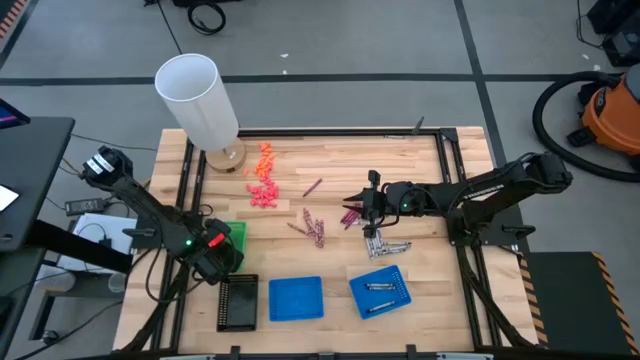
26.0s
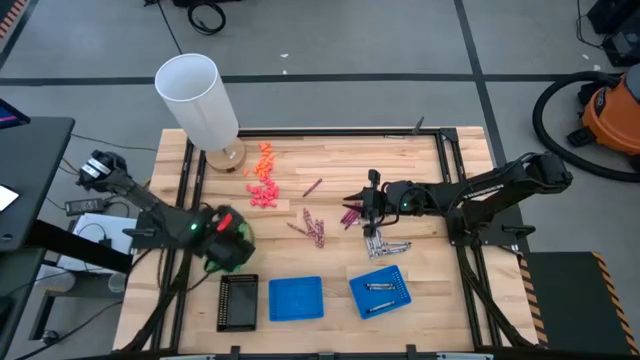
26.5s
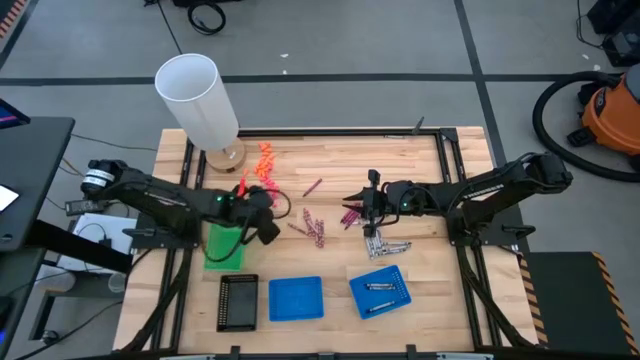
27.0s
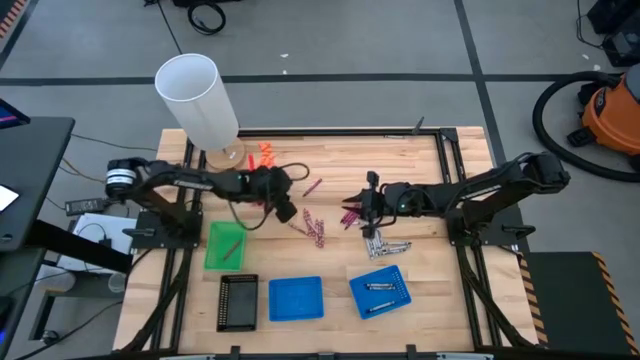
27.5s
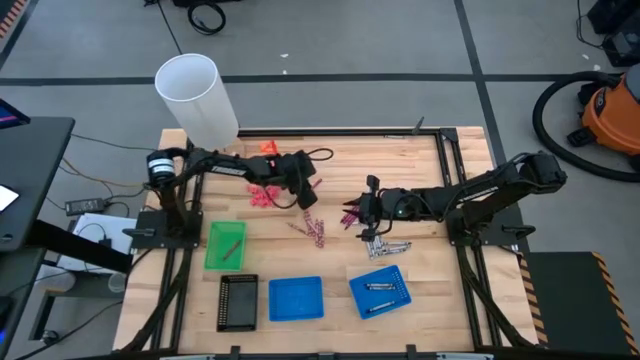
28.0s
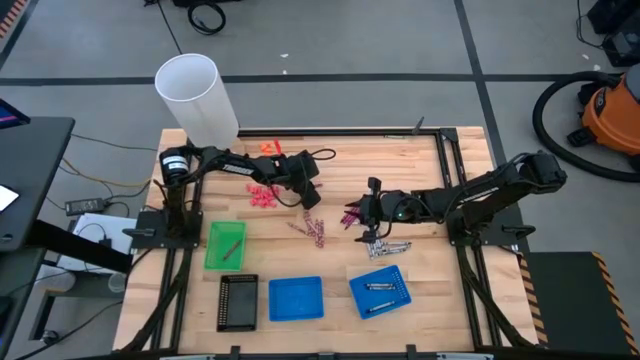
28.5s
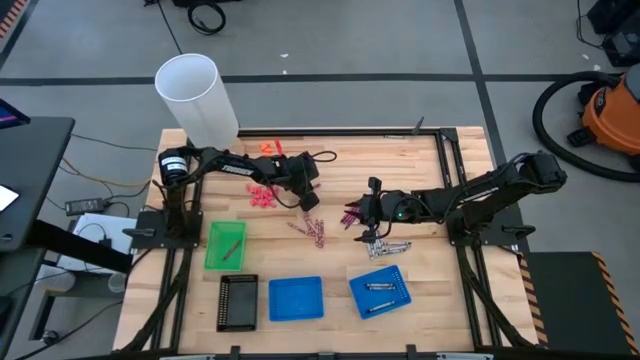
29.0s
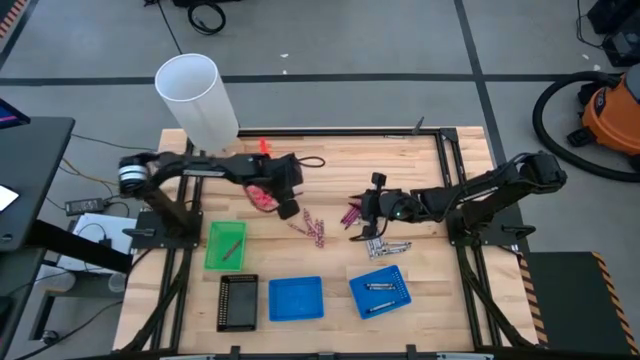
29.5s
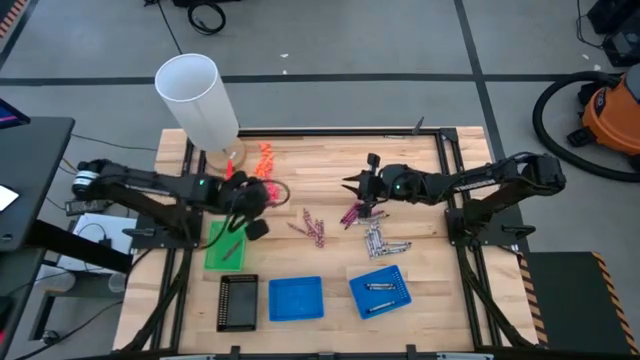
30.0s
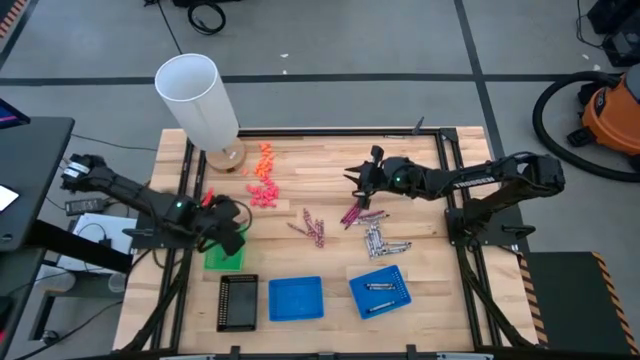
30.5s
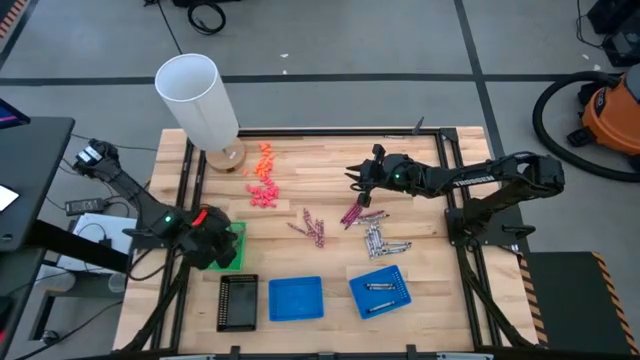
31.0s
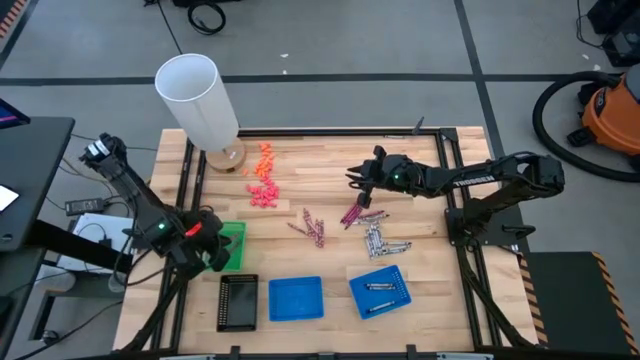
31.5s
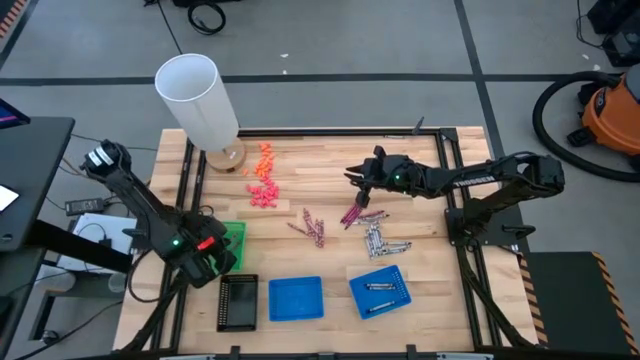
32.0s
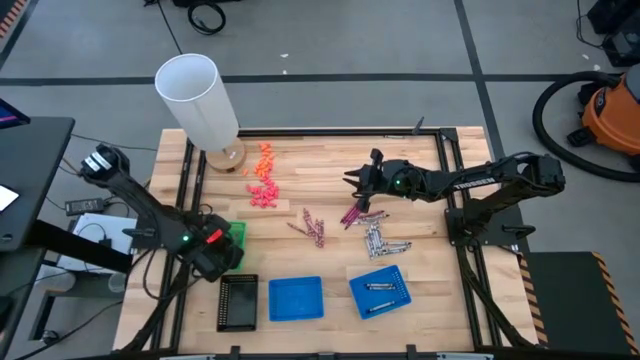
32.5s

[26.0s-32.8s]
Task: Sort crayons
Put the red crayon into the green basket

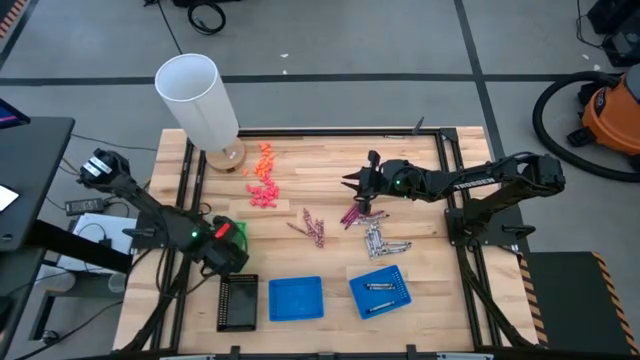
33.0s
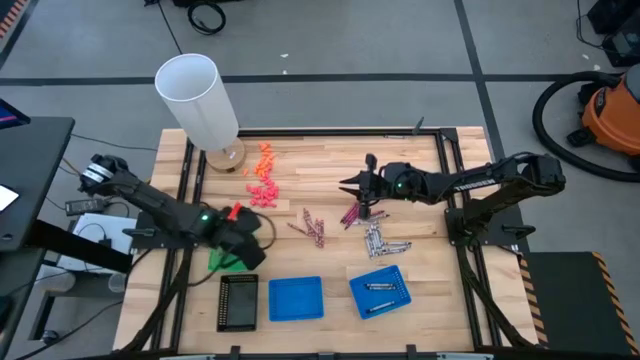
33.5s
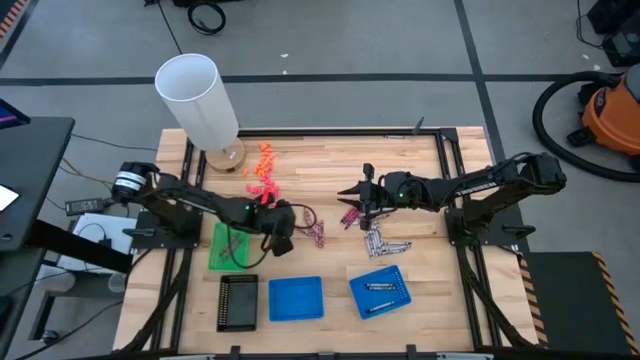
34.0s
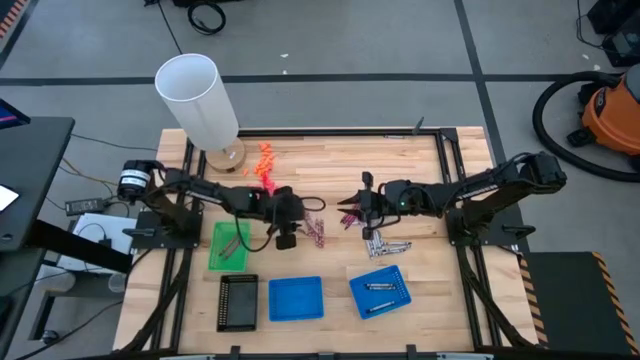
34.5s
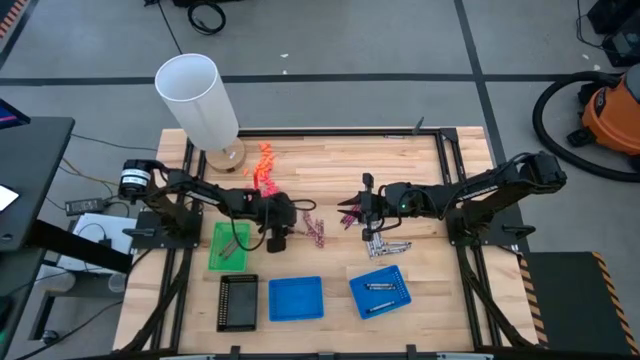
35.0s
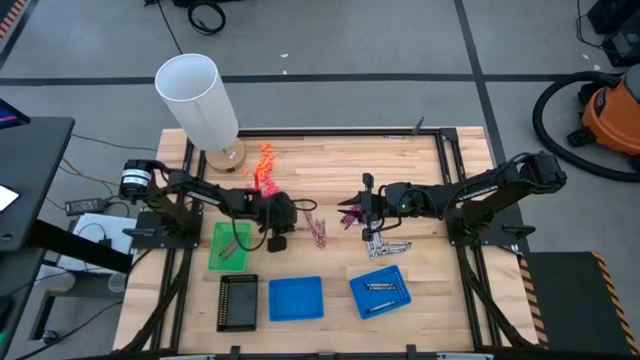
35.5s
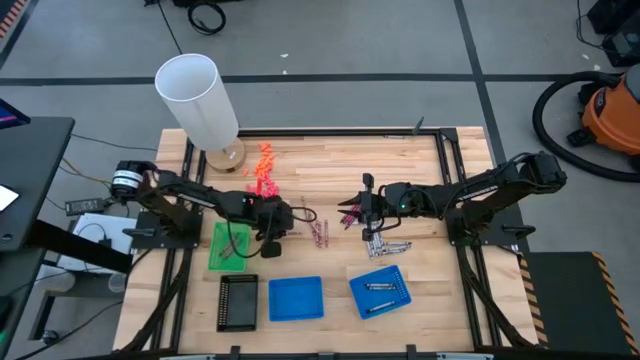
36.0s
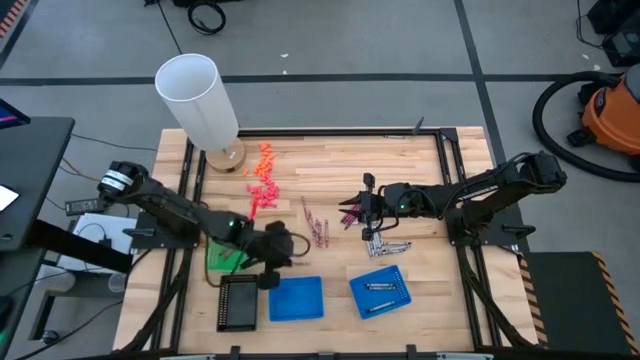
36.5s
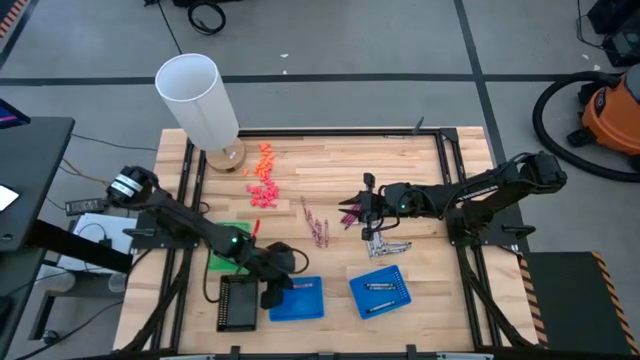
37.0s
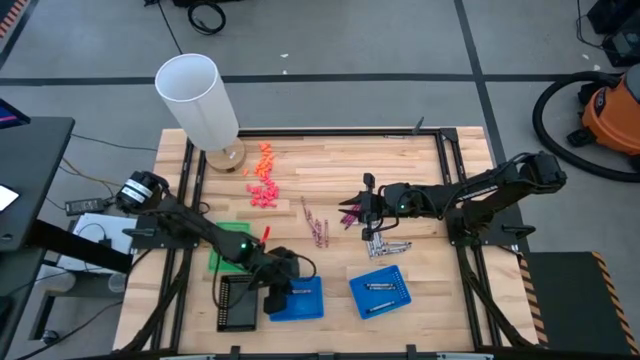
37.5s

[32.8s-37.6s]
Put the pink crayon into the left blue basket

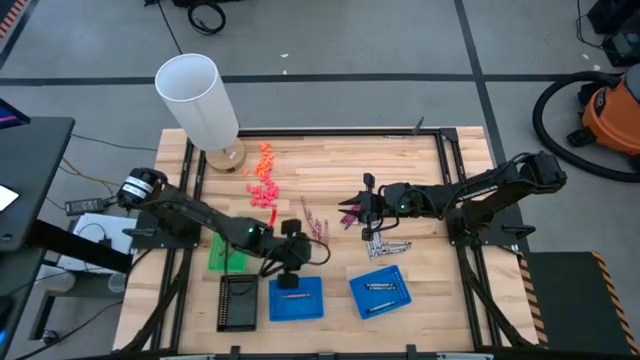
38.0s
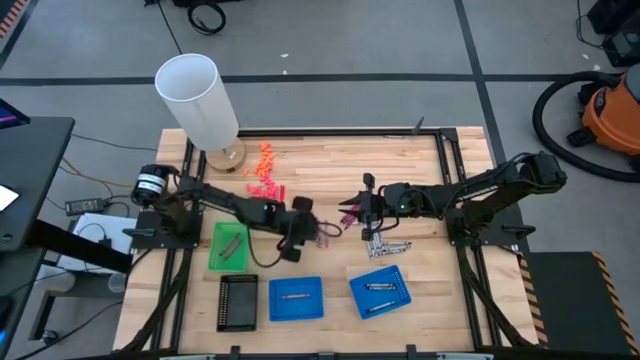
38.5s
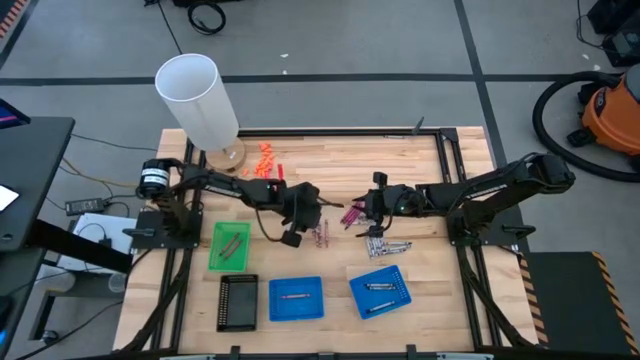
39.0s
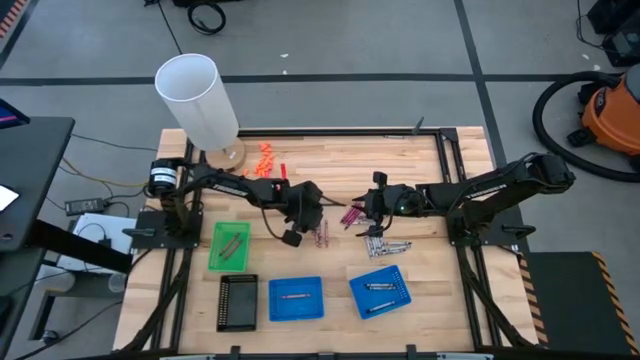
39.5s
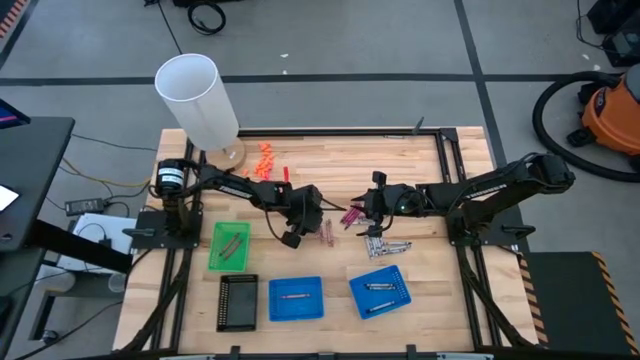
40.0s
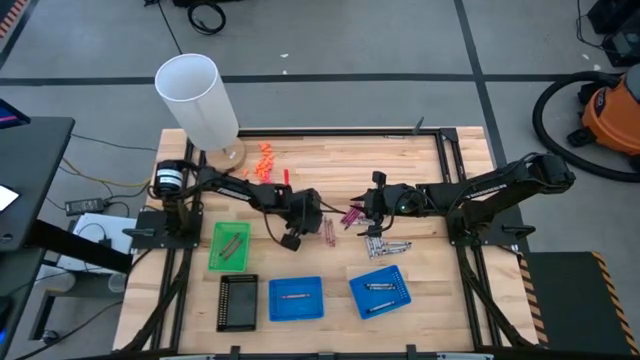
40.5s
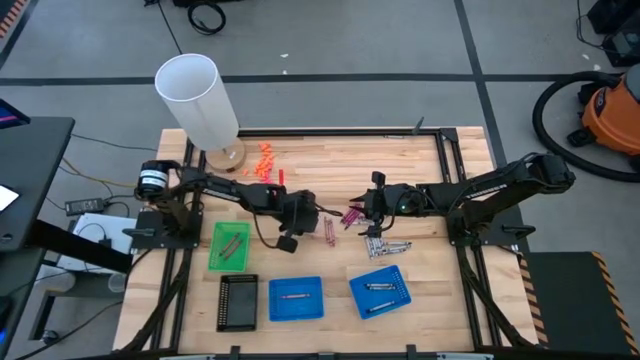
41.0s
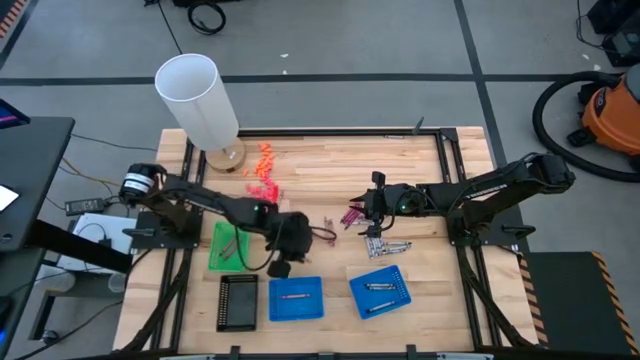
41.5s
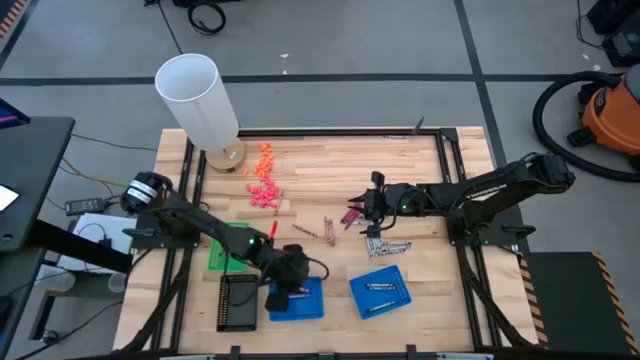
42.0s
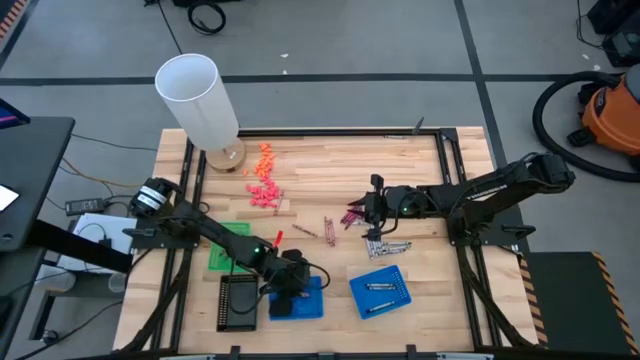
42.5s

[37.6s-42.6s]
Put the pink crayon into the left blue basket

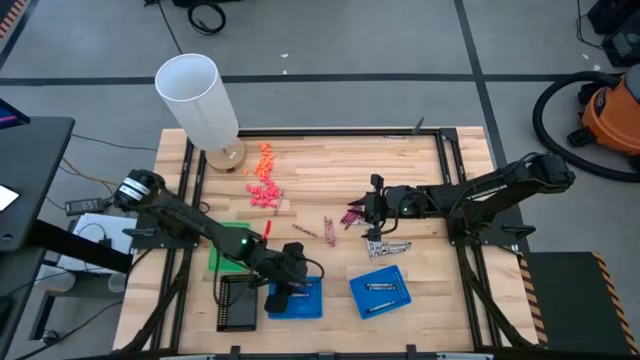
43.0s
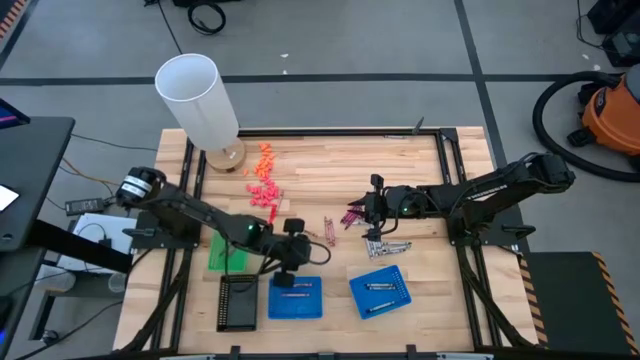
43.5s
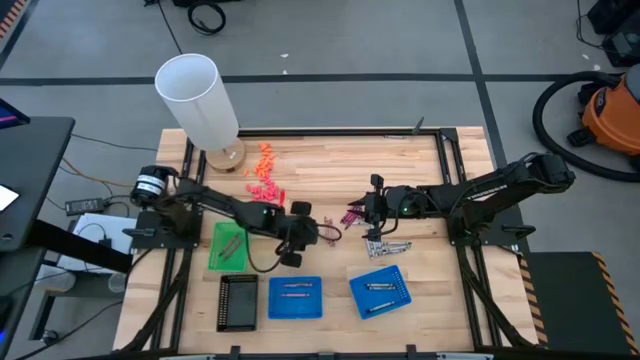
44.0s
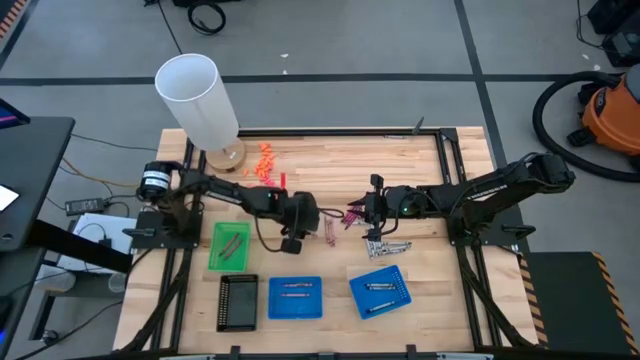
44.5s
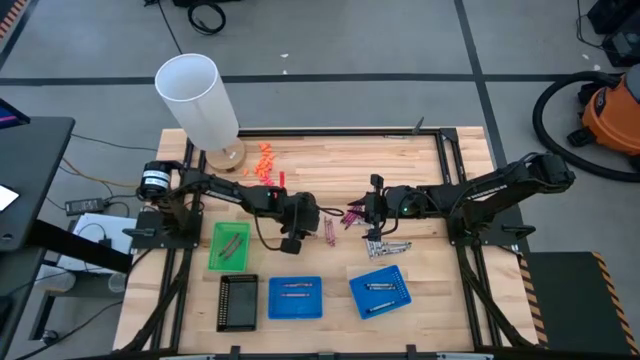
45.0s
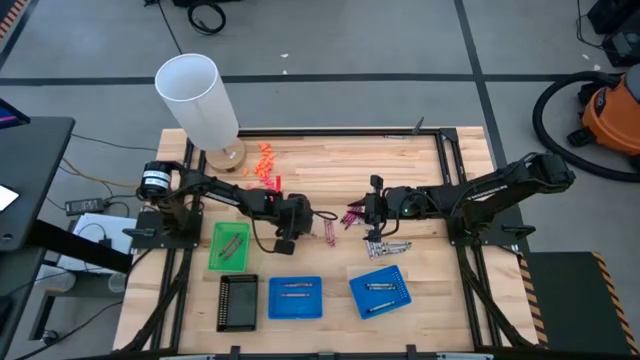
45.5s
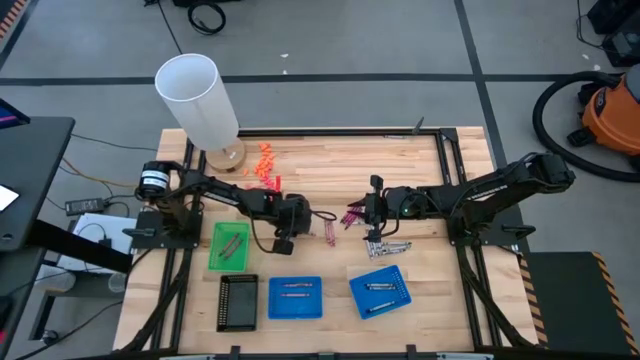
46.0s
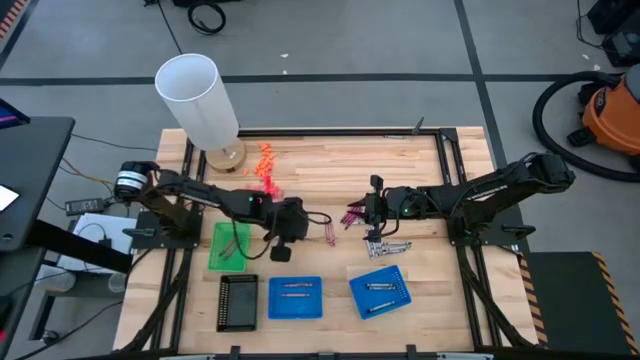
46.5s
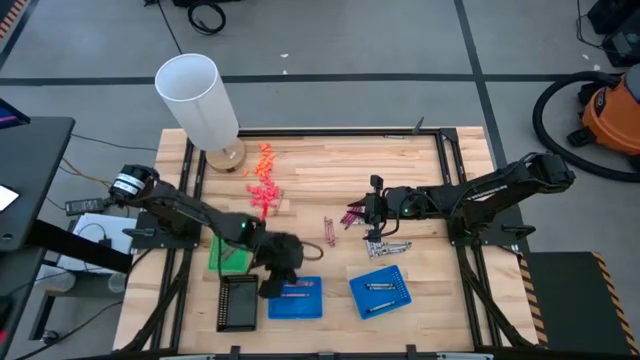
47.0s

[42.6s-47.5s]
Put the pink crayon into the left blue basket
